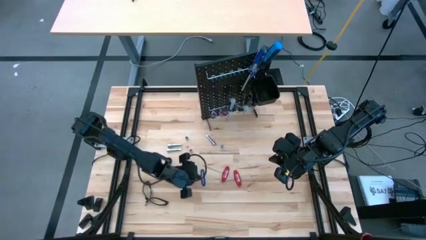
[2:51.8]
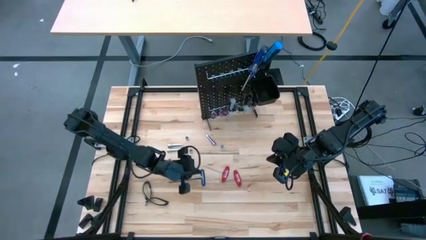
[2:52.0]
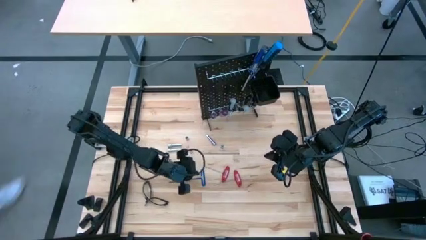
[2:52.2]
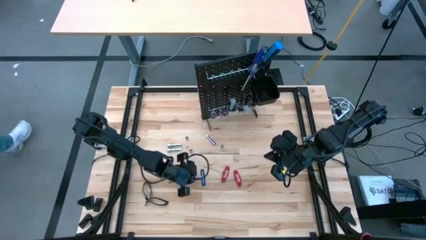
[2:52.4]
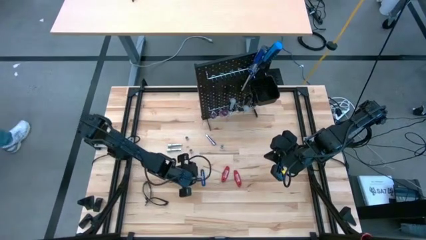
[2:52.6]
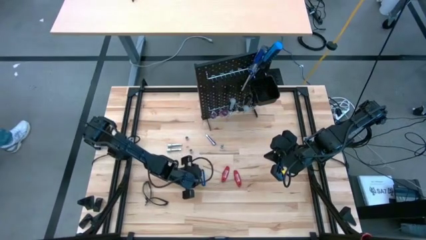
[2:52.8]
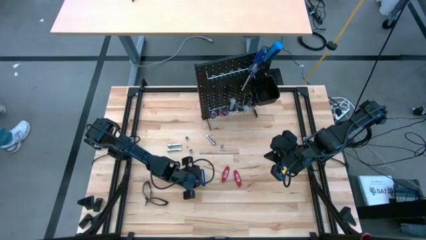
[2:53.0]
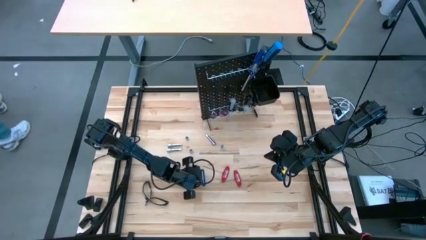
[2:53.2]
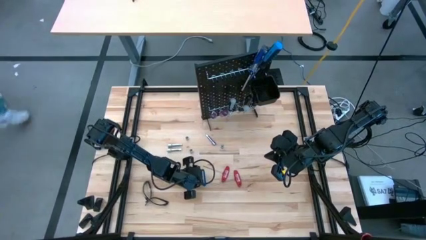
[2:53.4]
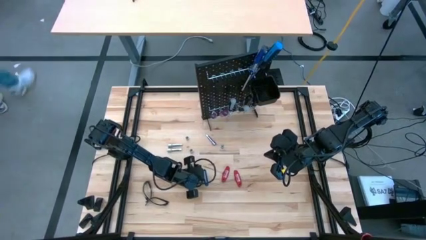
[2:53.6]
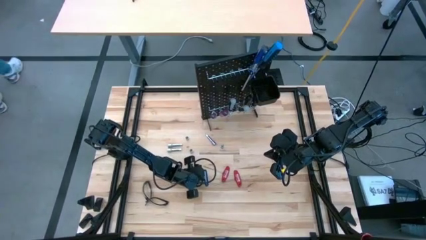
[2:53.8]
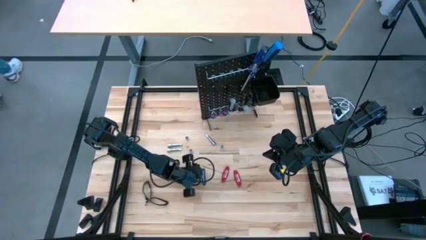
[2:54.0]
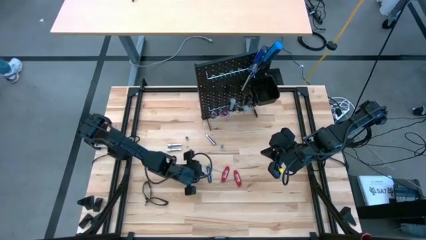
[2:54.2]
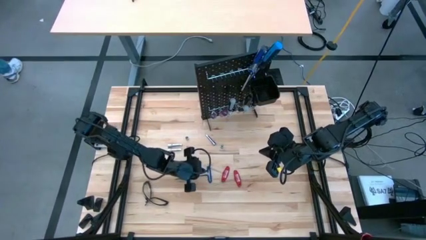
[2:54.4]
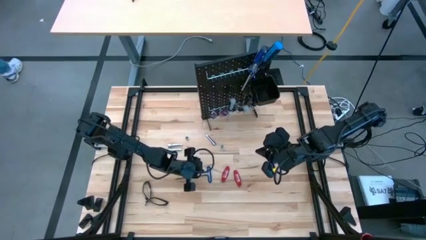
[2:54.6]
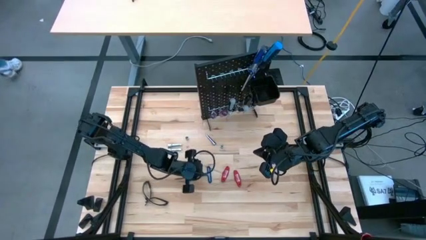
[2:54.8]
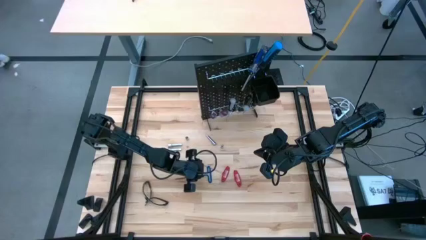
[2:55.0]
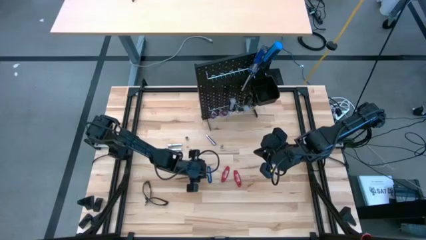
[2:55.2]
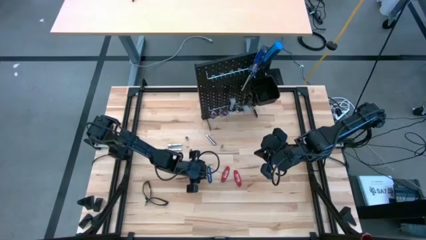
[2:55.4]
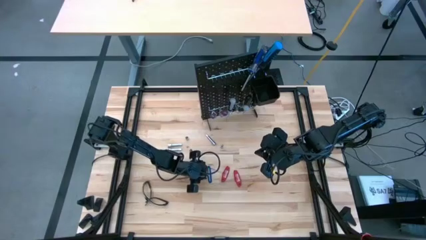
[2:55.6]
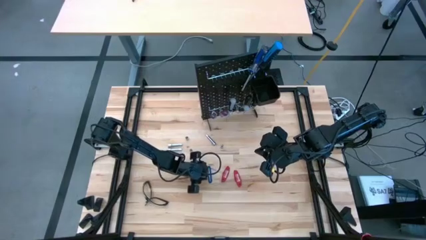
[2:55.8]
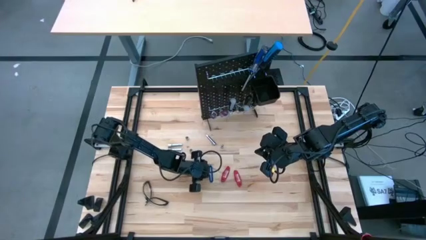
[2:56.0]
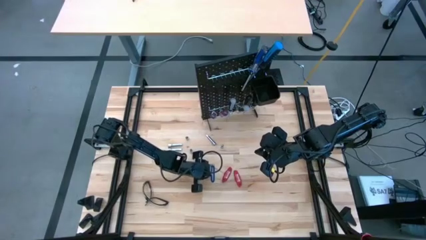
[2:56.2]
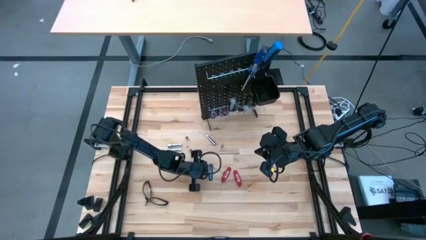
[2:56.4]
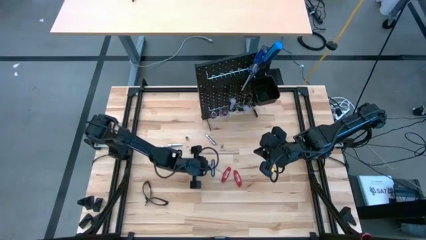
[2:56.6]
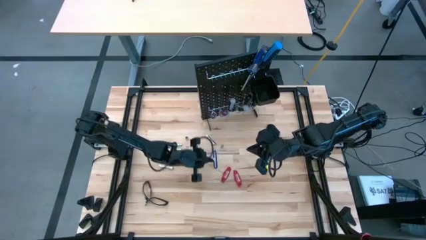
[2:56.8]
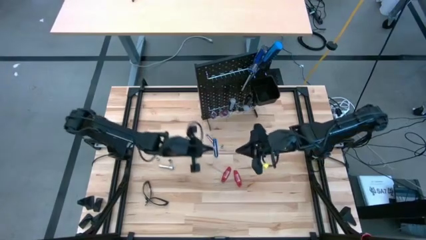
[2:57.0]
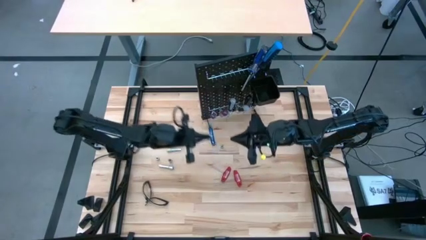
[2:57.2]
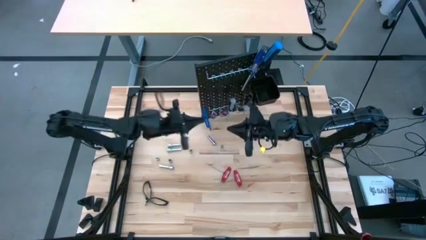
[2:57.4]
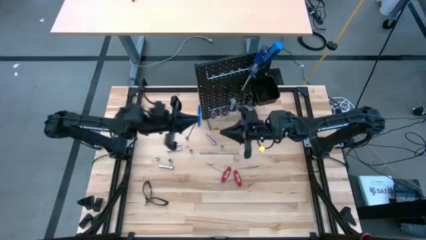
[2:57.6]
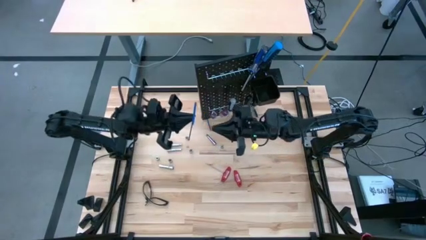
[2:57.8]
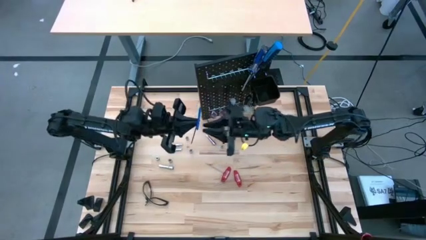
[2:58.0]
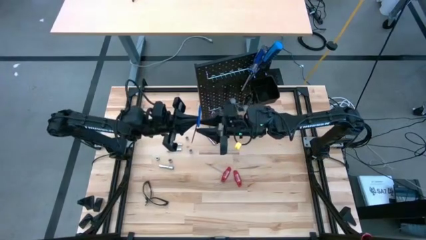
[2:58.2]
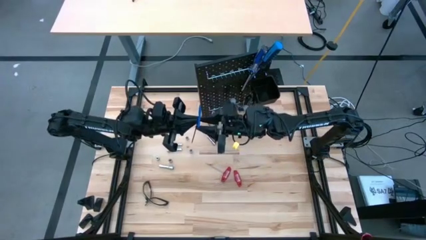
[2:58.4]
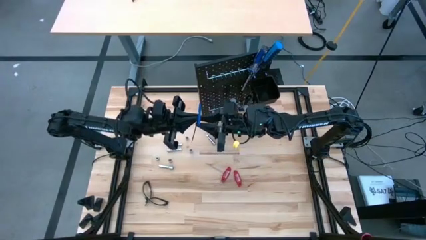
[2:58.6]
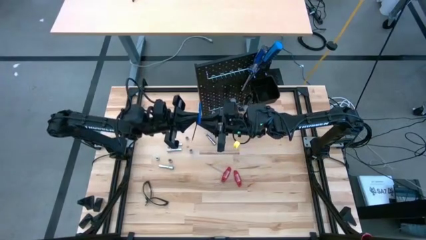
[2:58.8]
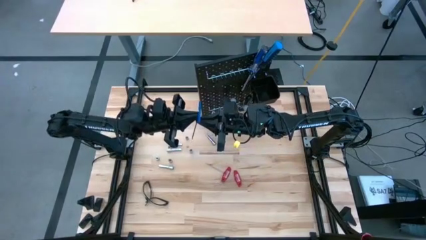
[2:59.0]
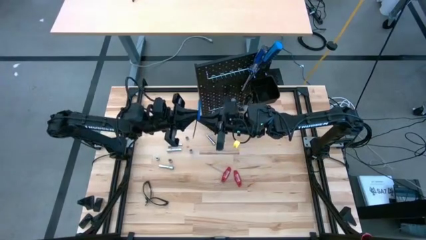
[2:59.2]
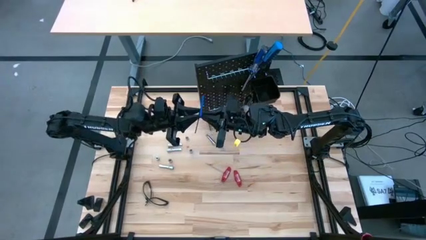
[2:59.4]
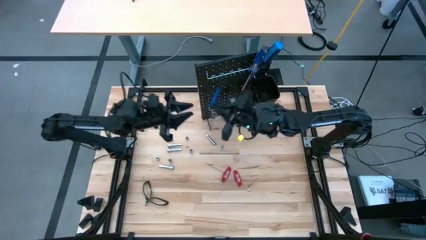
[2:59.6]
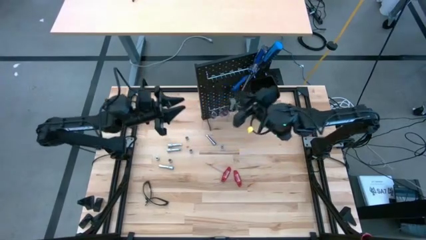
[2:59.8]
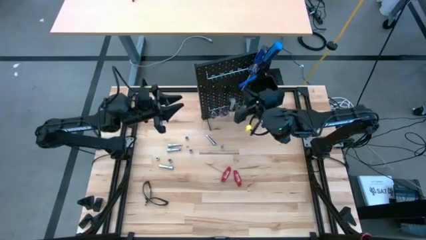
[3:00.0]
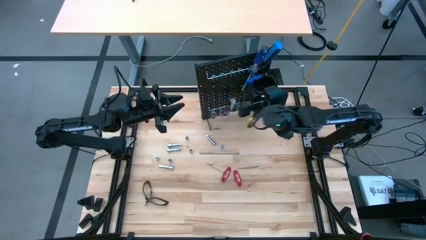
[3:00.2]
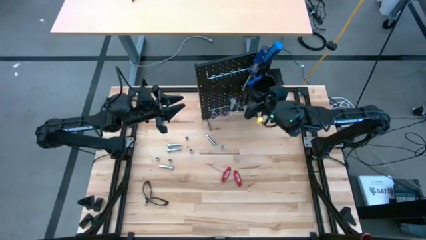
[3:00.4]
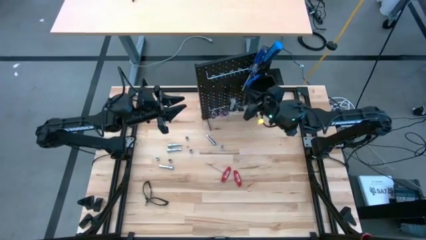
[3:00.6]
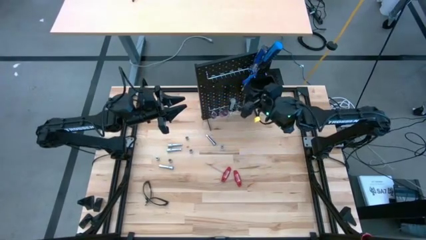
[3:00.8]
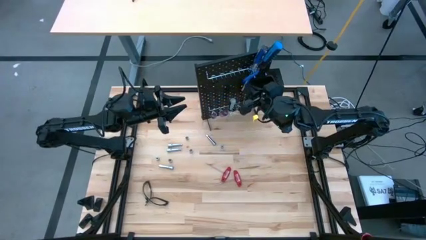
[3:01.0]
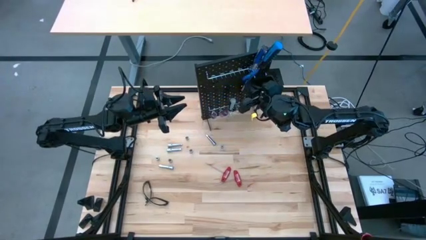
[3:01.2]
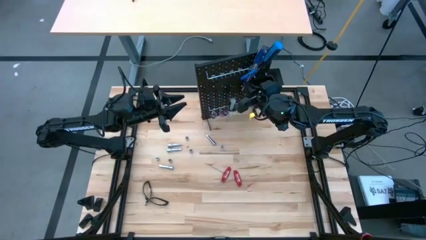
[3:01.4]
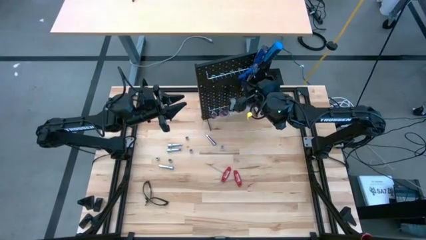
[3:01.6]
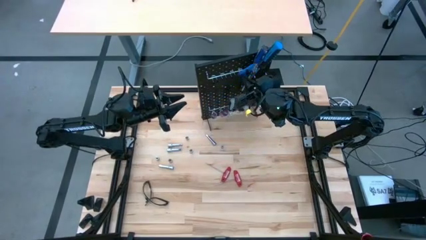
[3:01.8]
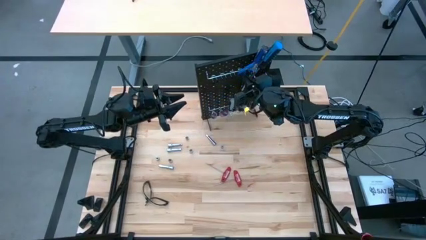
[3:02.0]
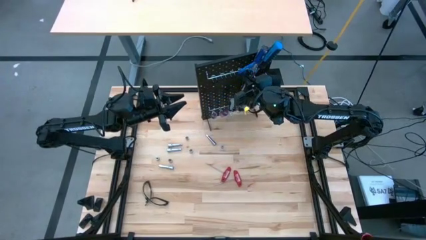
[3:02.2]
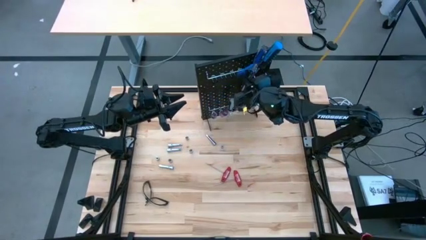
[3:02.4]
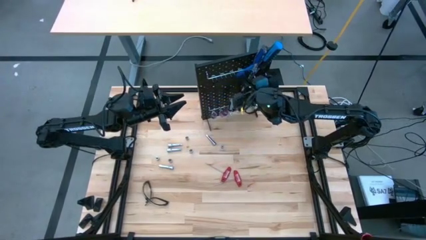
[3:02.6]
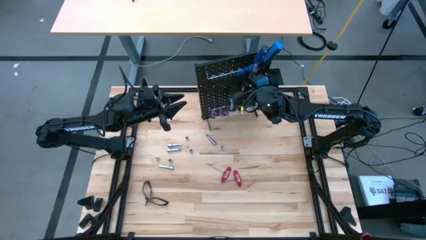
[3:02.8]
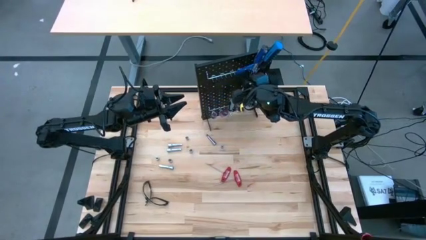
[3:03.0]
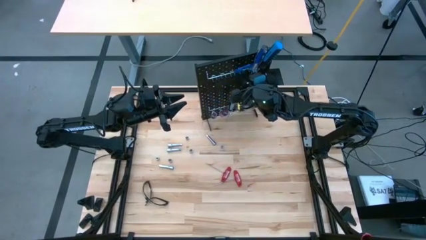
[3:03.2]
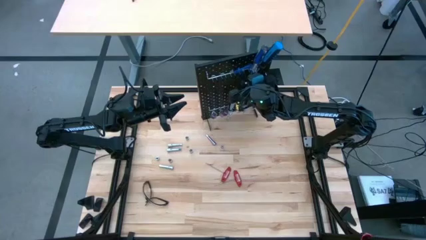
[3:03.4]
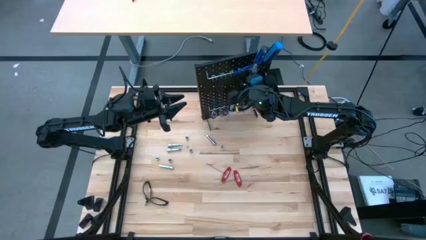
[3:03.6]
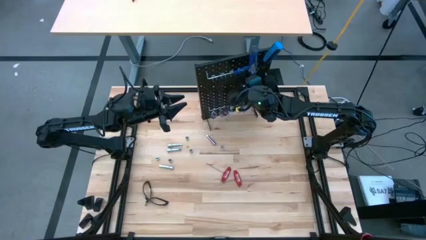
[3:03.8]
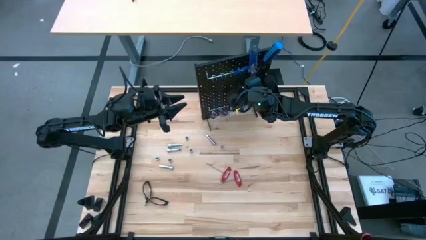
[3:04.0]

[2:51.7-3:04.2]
Task: Hang tools onto peg board
Hang the blue pick tool on the pegboard

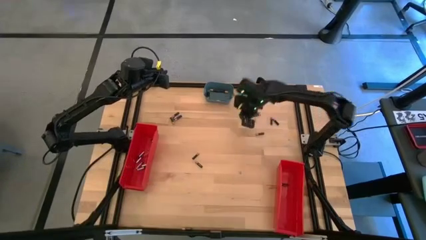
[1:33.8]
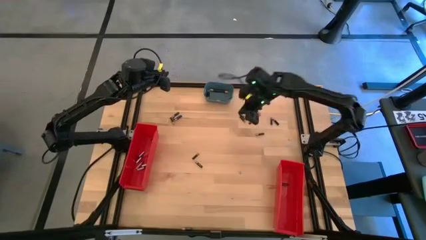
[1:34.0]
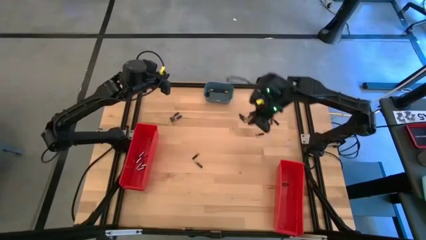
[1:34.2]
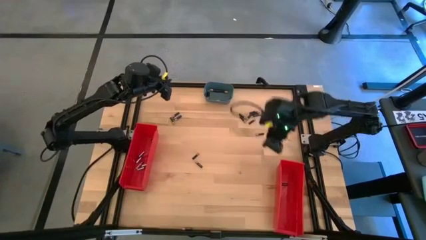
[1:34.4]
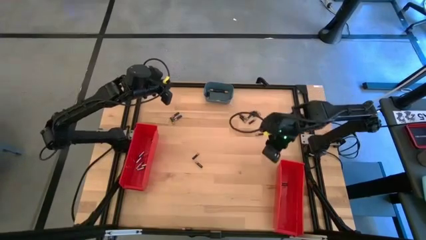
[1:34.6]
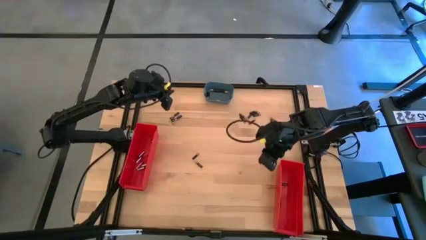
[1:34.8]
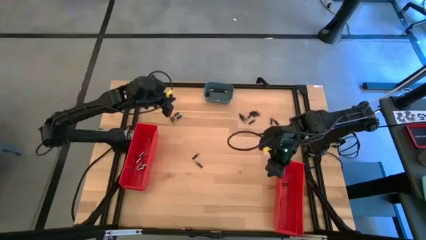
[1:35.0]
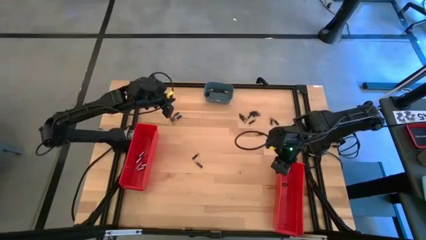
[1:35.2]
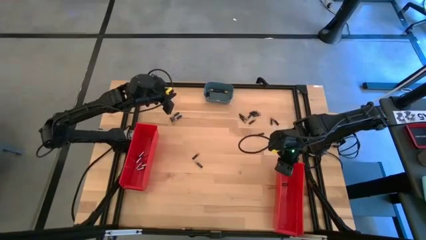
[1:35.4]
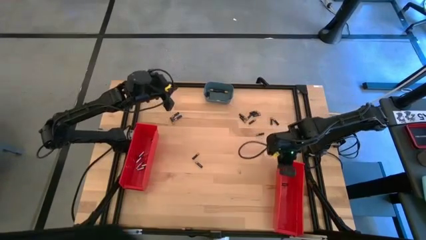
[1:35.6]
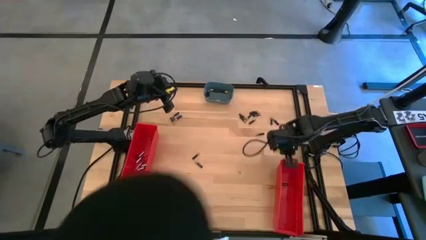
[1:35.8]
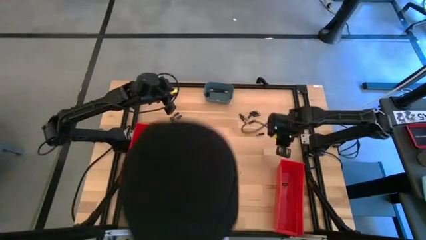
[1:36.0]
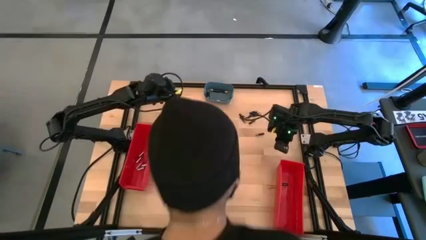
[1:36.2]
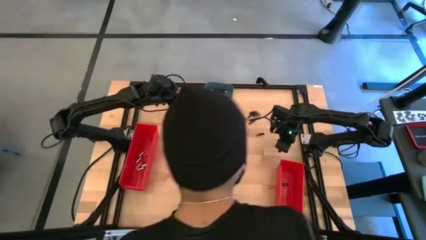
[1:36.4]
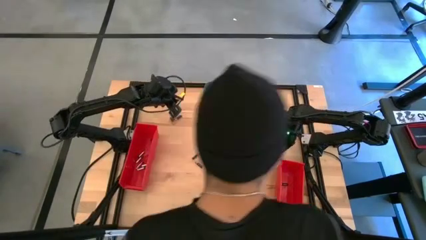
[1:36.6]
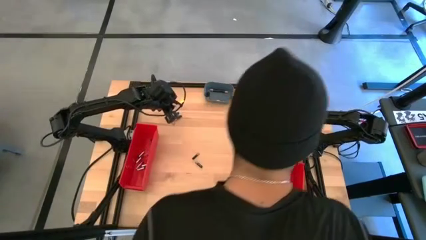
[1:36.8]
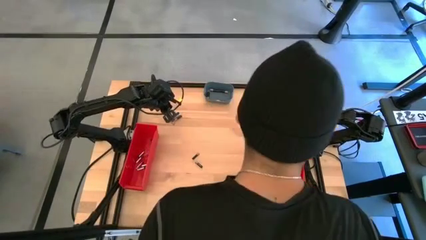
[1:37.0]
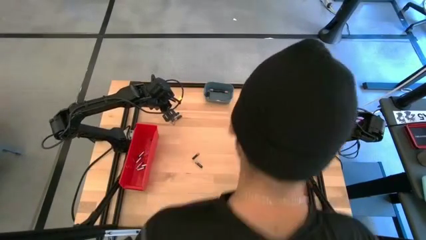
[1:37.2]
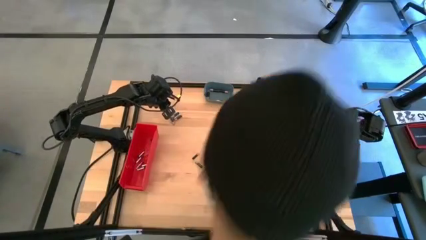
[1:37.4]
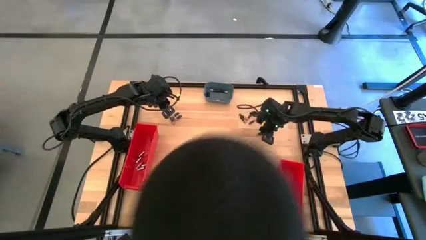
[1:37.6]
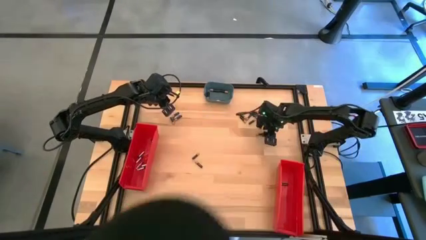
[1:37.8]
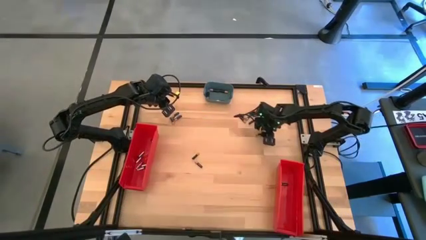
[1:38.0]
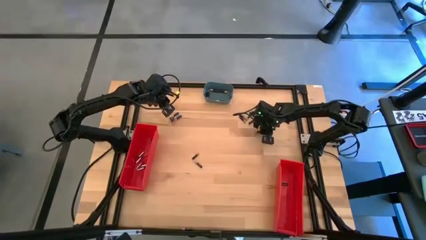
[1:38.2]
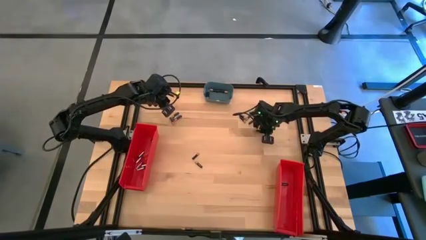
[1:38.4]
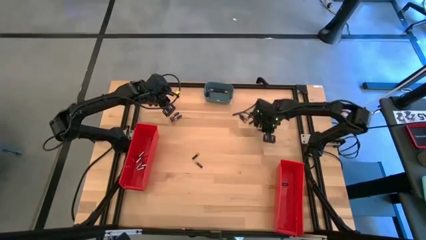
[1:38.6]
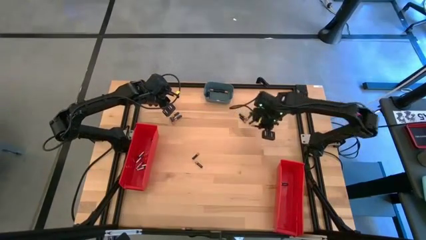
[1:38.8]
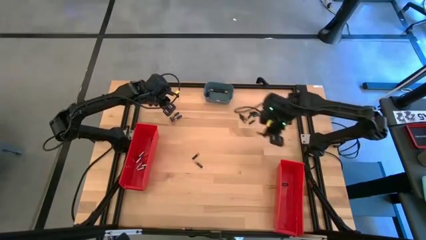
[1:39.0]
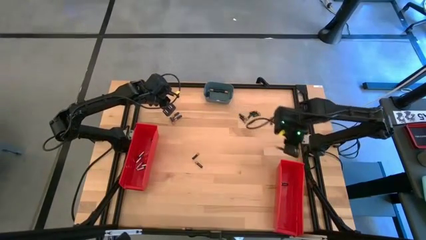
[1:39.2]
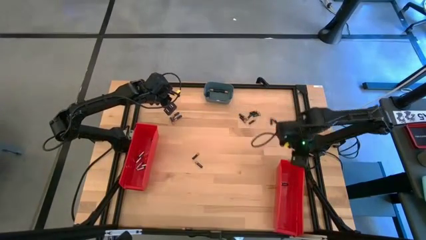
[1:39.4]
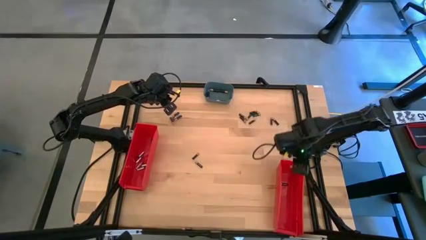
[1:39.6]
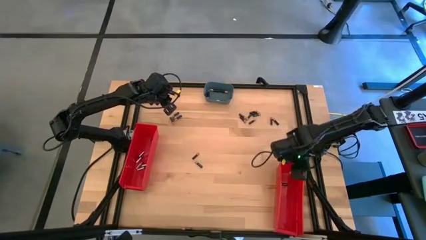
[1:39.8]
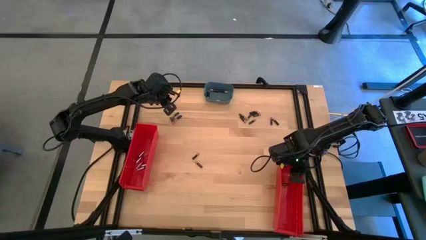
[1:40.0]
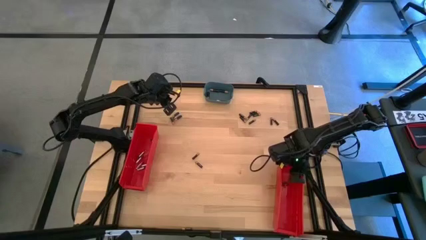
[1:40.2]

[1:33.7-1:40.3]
Task: Sort batteries
Put the small brown battery into the right red bin
